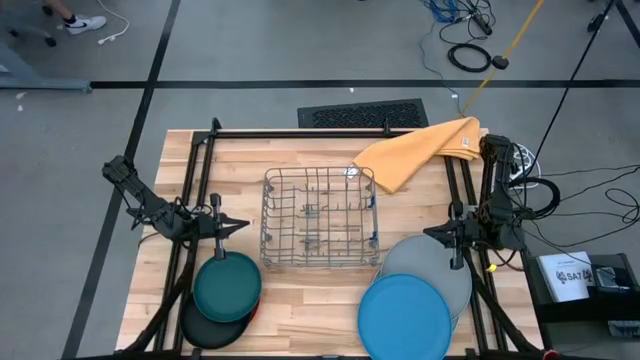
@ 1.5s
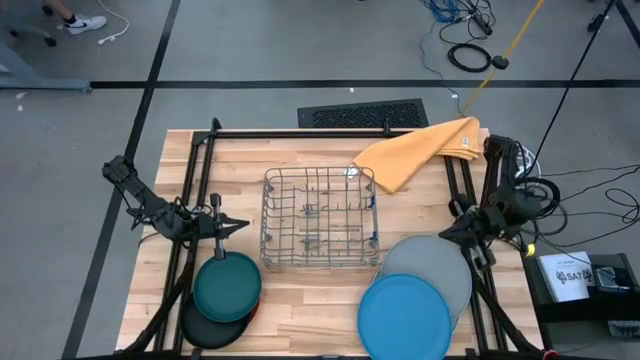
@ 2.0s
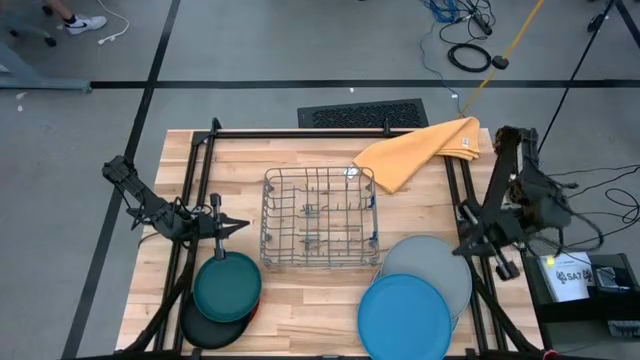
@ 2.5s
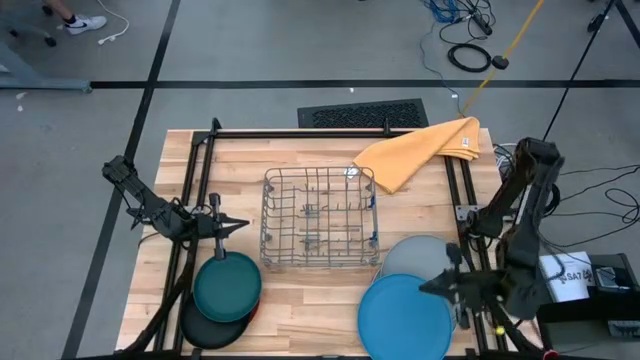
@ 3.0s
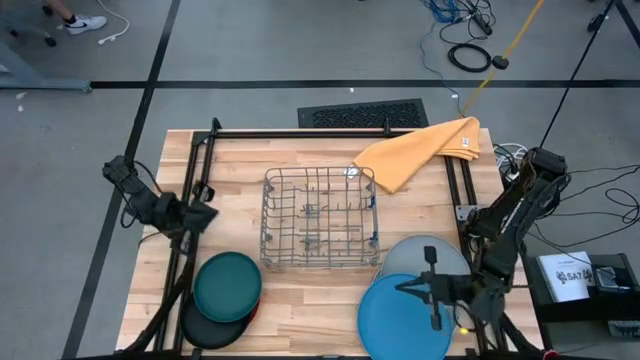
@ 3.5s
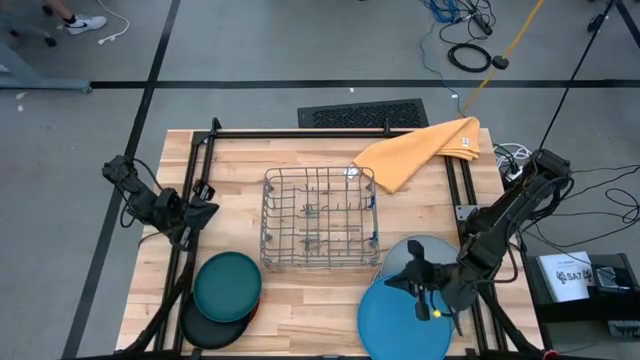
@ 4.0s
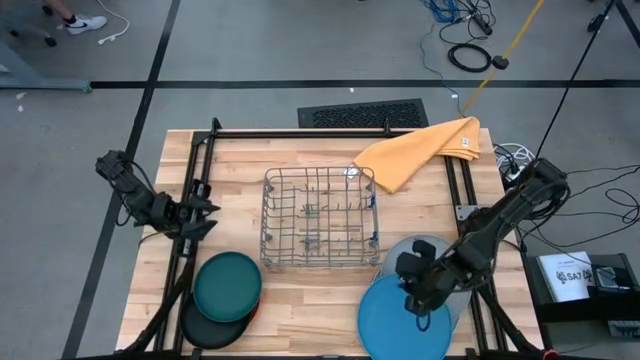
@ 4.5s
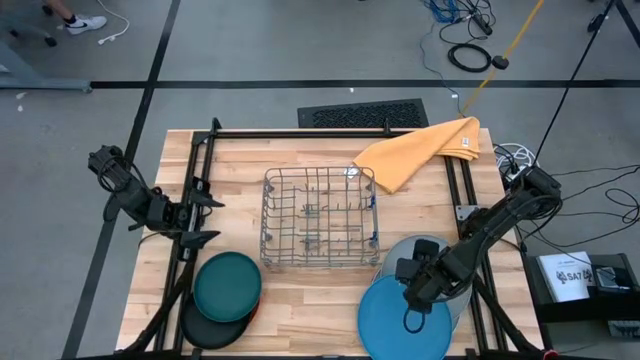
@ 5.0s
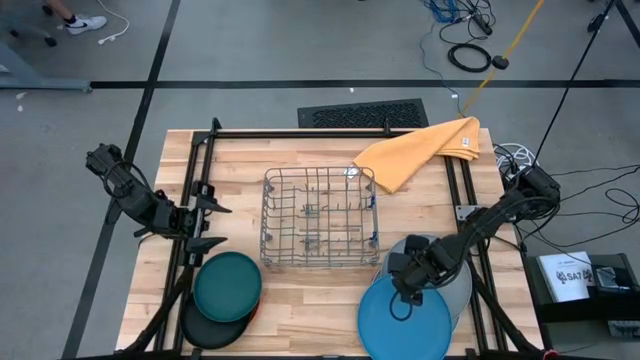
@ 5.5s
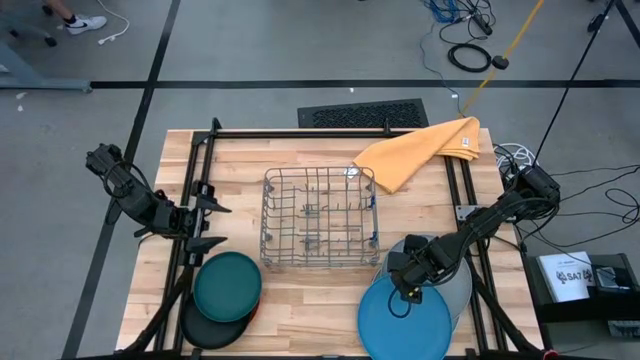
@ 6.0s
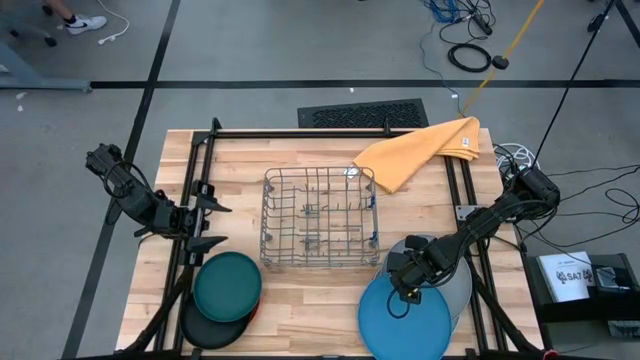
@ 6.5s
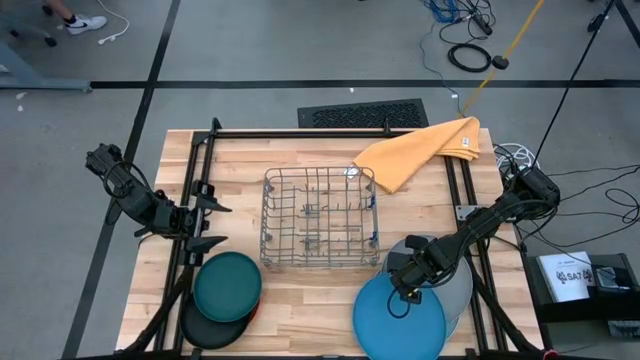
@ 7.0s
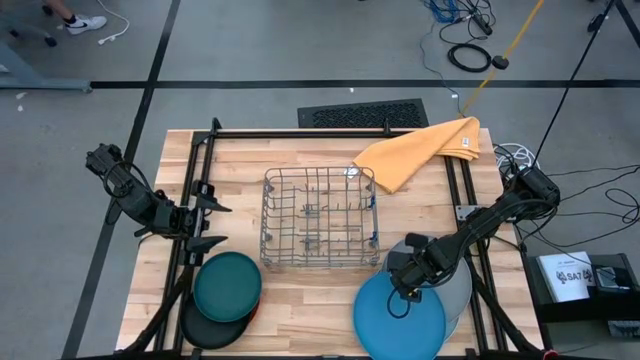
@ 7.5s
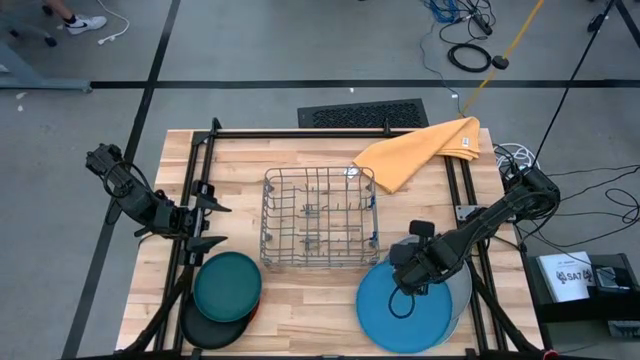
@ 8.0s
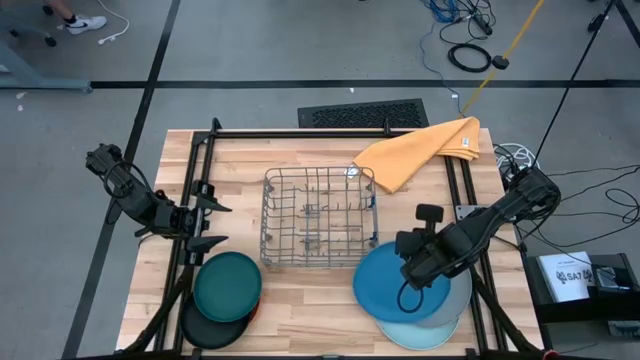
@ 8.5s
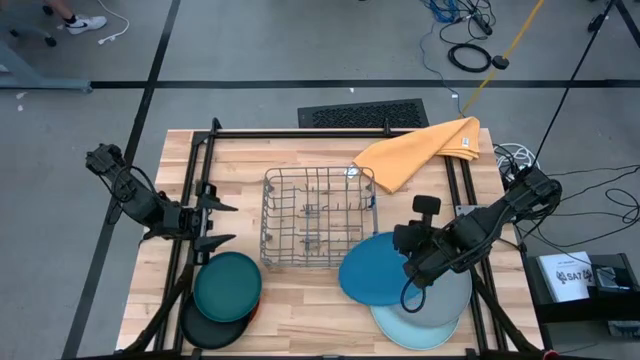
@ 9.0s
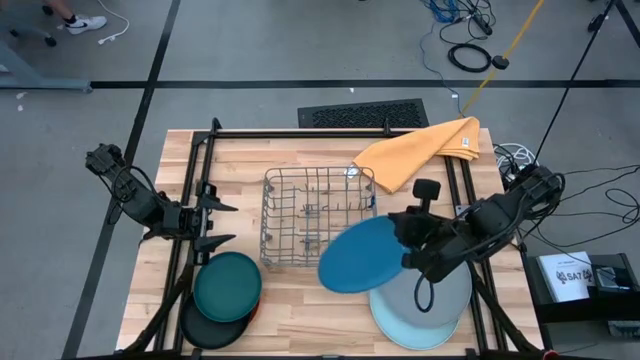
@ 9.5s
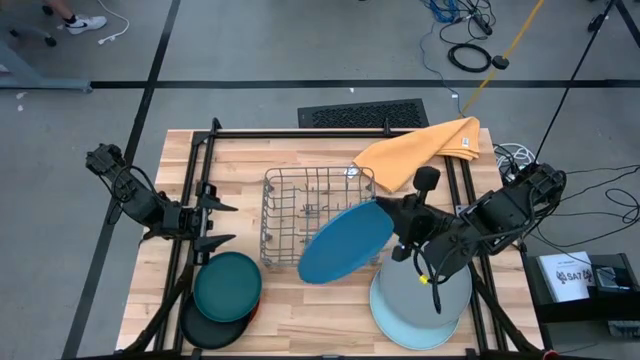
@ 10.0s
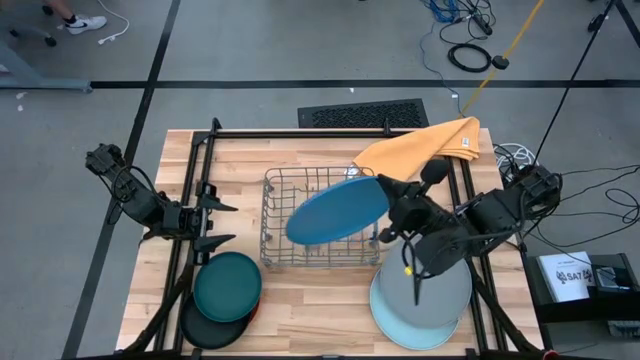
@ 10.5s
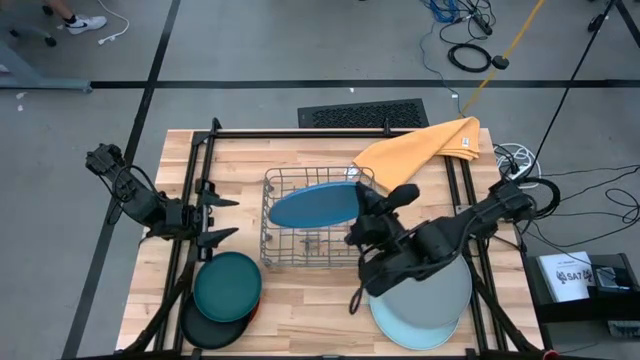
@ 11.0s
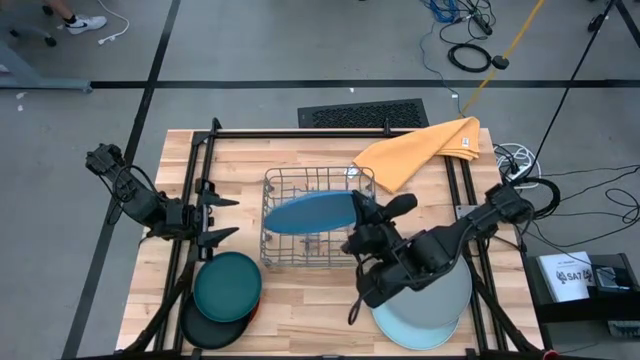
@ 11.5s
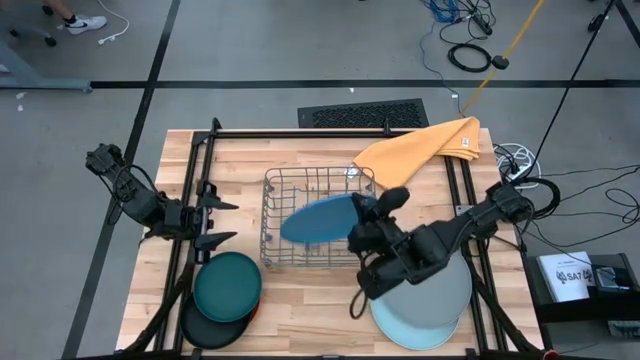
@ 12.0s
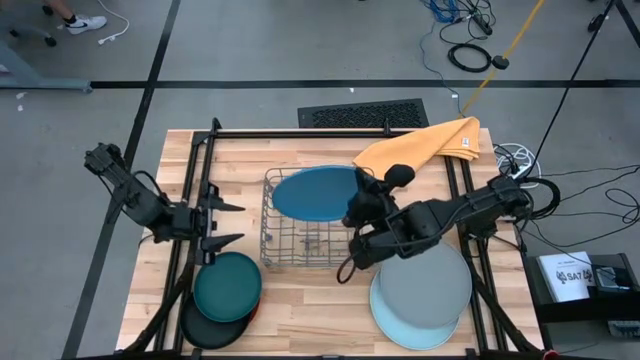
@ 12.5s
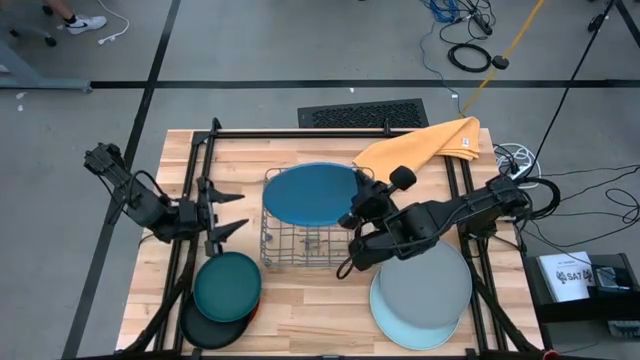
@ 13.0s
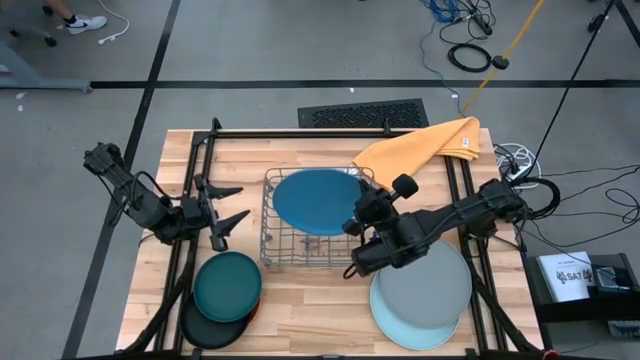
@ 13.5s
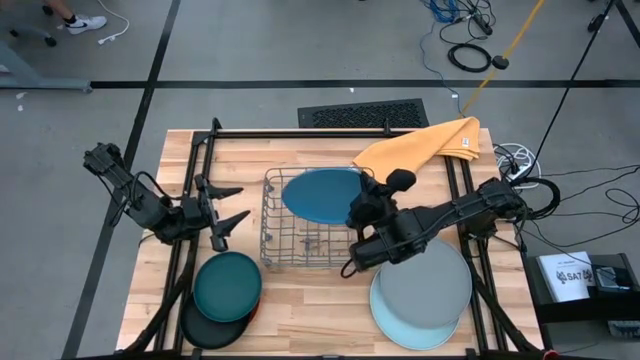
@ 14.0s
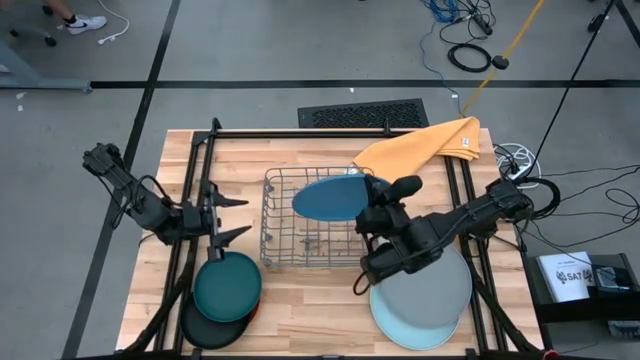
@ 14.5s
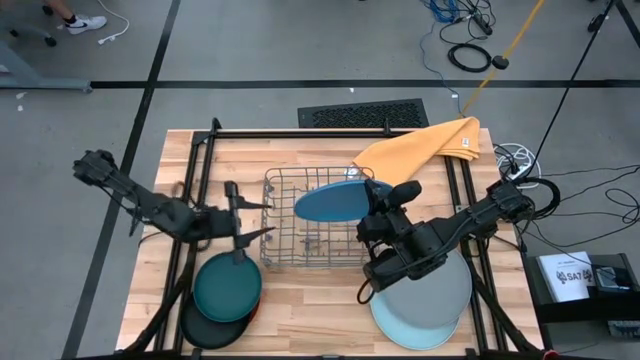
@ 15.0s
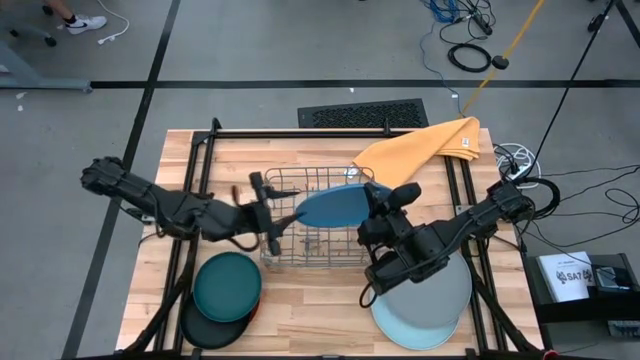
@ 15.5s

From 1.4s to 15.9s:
Task: Sort dishes
Put the blue plate into the green dish rack

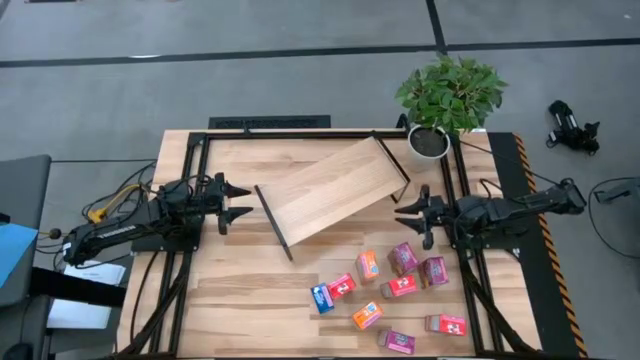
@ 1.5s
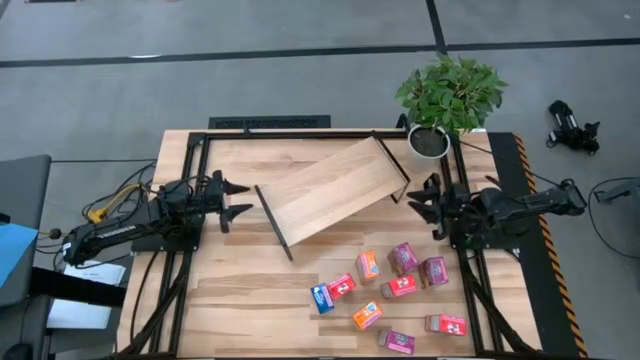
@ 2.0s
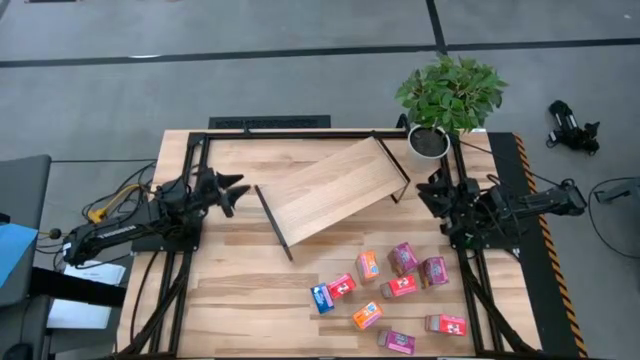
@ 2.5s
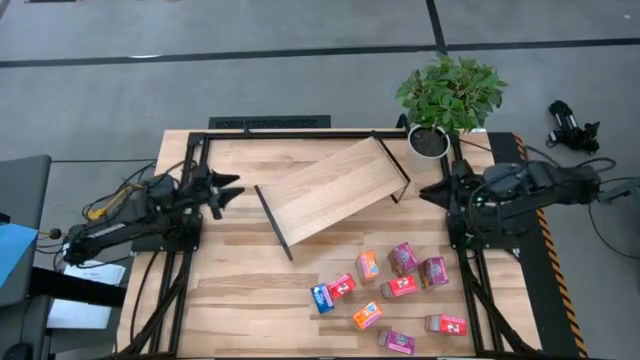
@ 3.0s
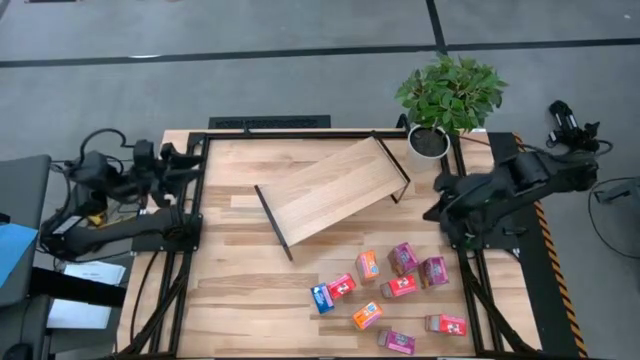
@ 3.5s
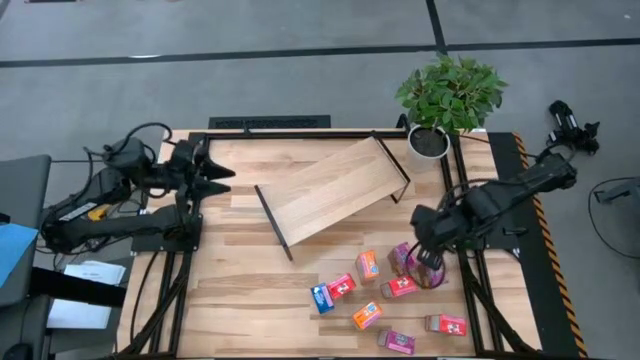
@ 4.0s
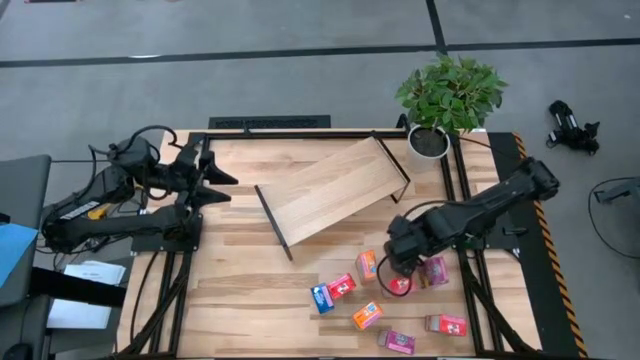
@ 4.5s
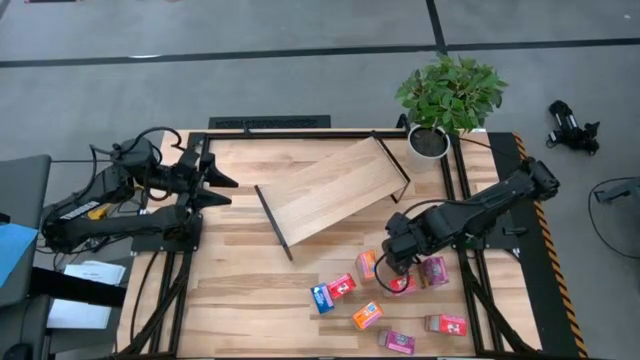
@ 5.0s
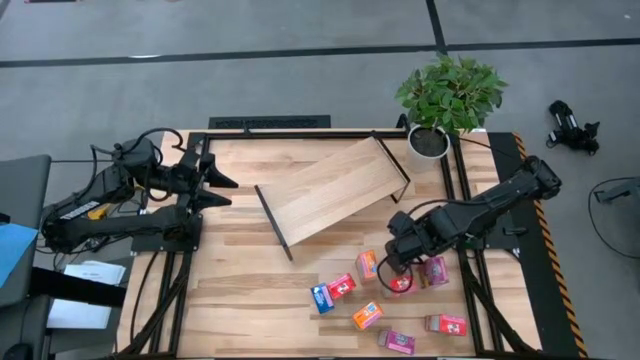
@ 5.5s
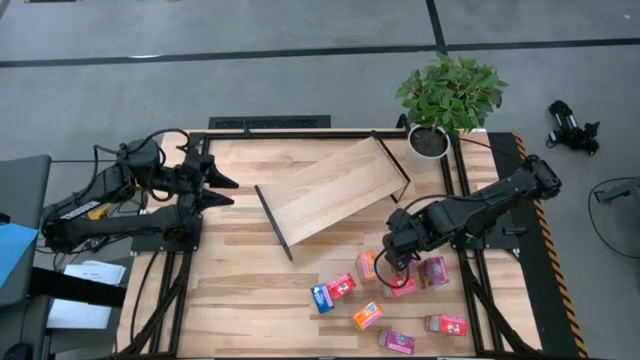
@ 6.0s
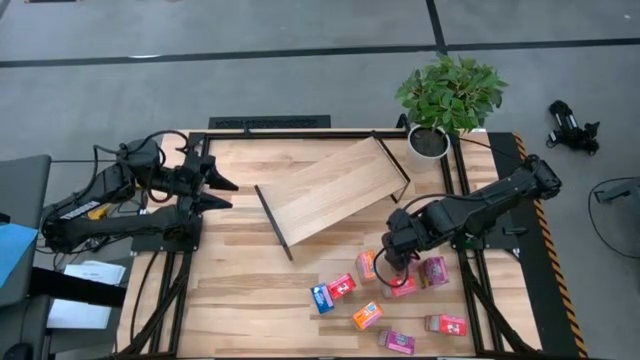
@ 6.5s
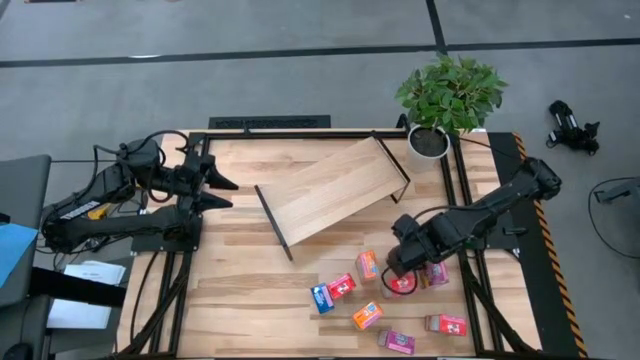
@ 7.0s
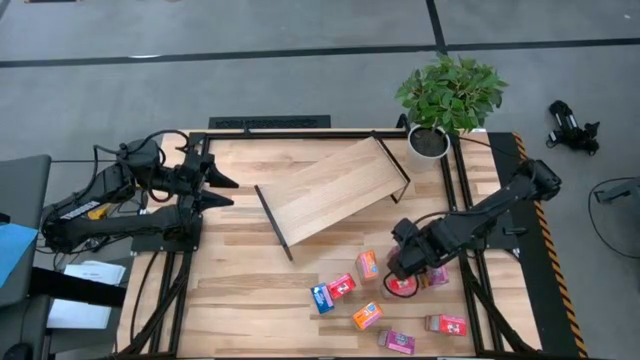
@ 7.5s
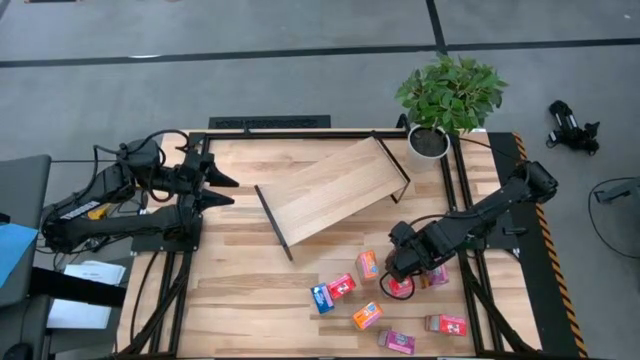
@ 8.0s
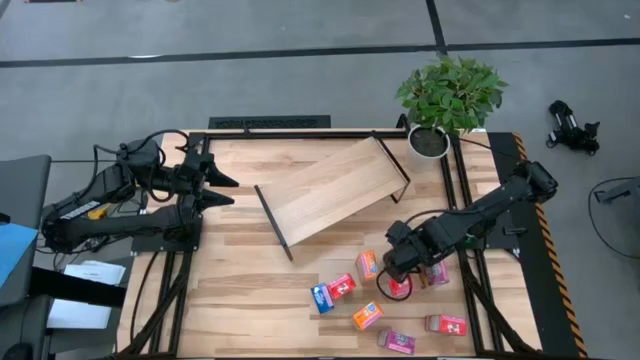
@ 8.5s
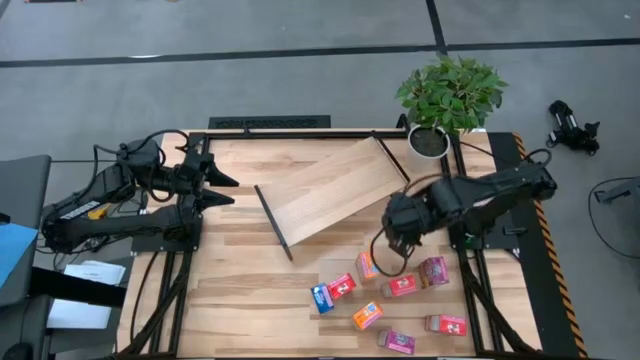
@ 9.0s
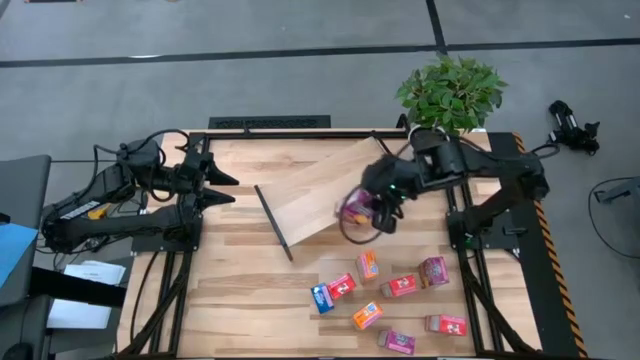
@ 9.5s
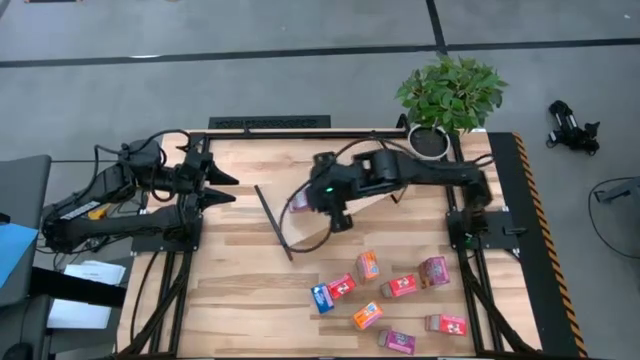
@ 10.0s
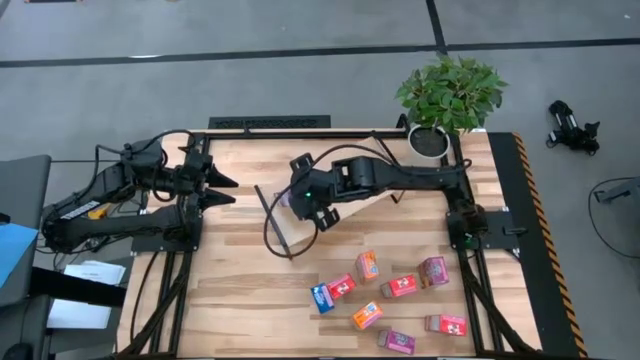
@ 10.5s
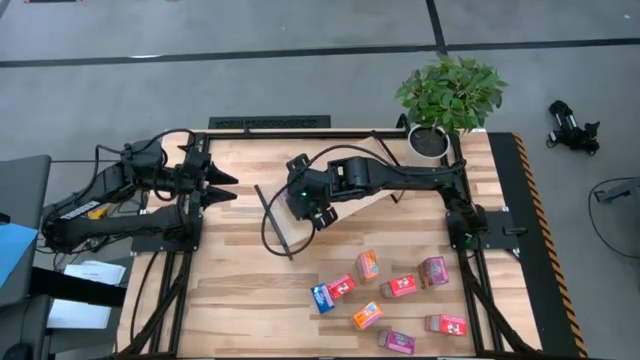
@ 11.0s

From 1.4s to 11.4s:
Task: Stack cereal on shelf
Put the top left purple cereal box on the shelf
